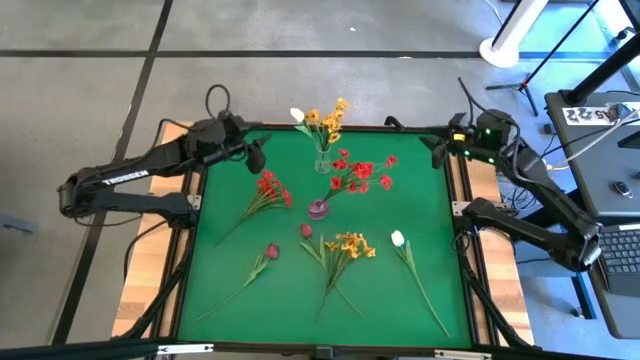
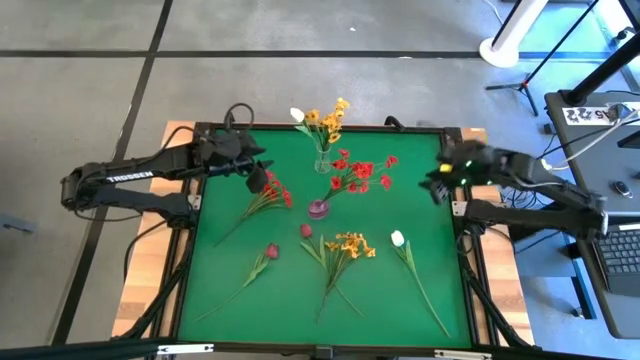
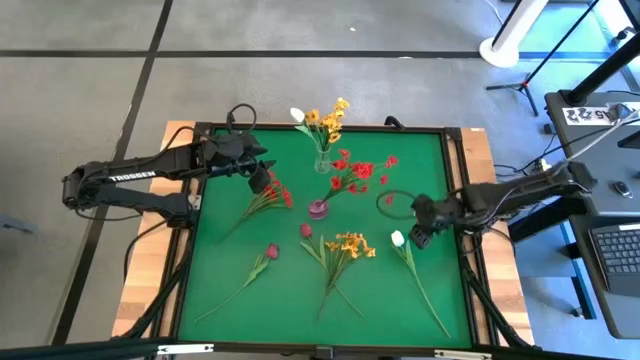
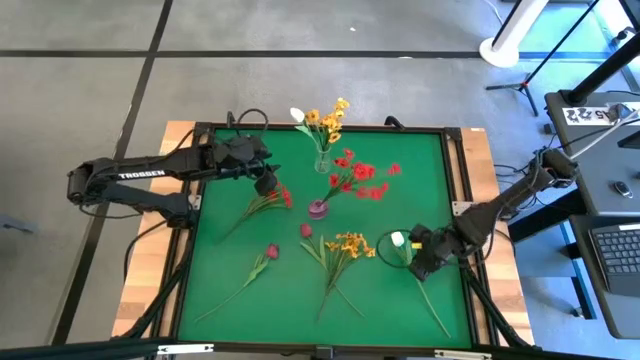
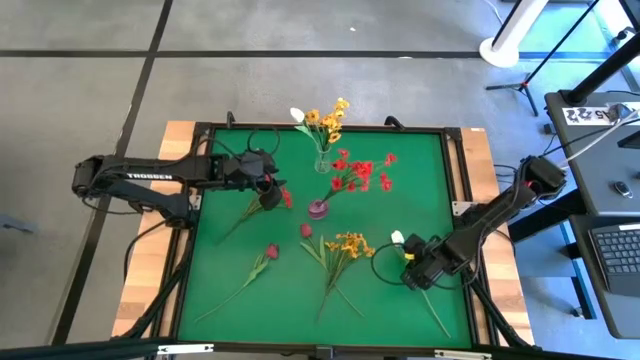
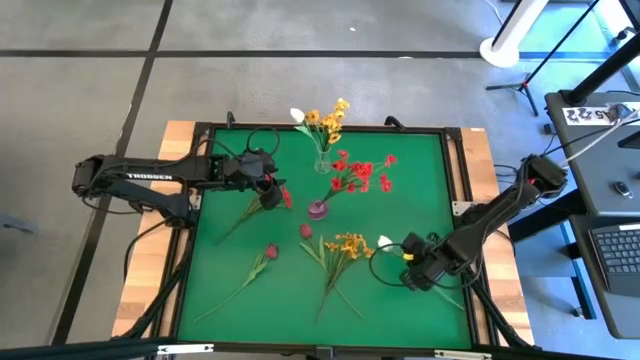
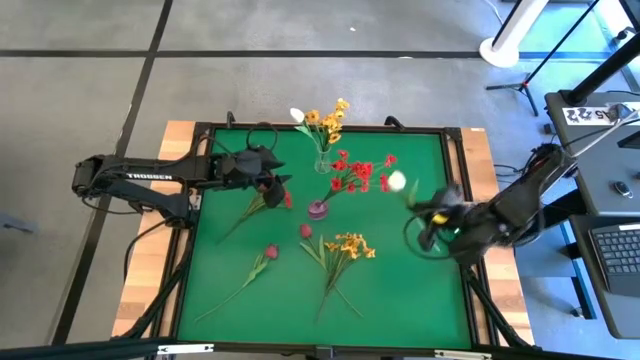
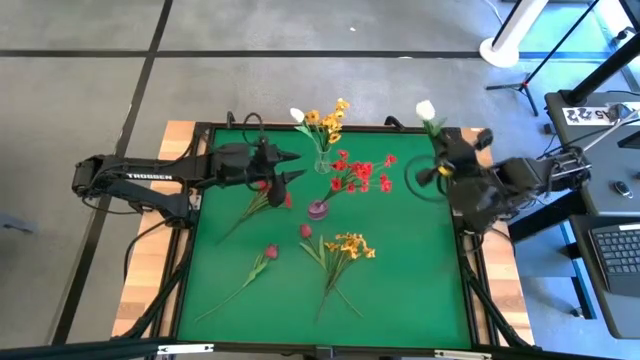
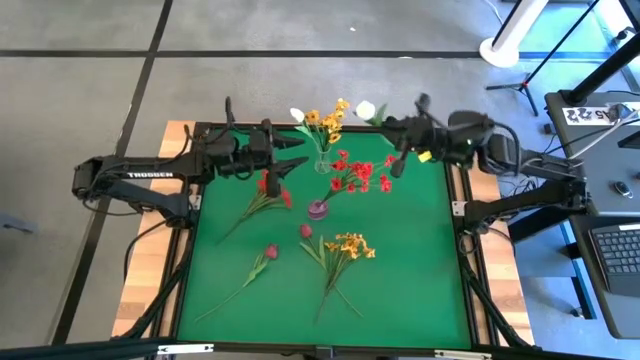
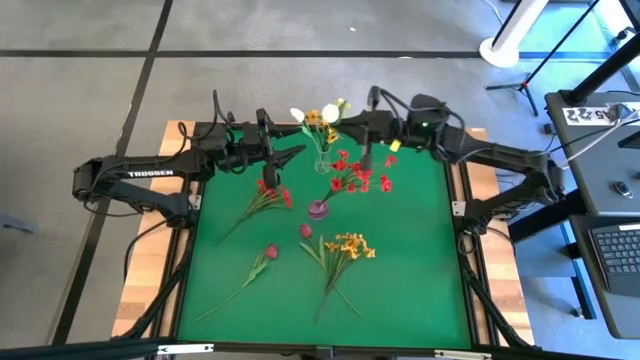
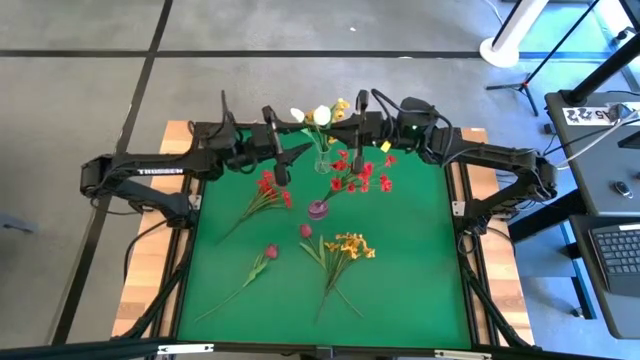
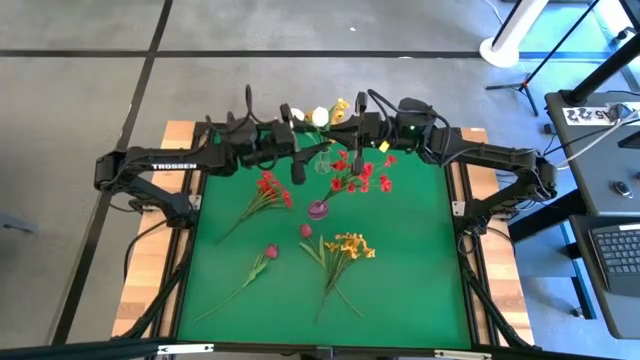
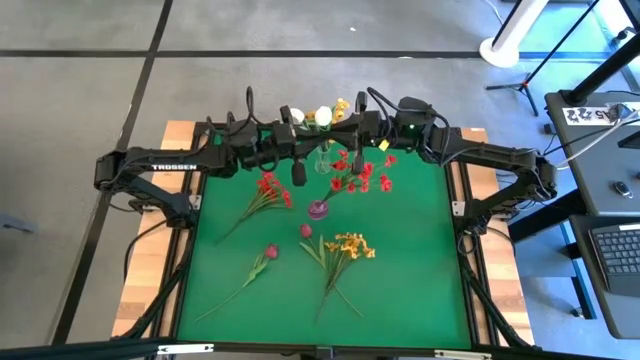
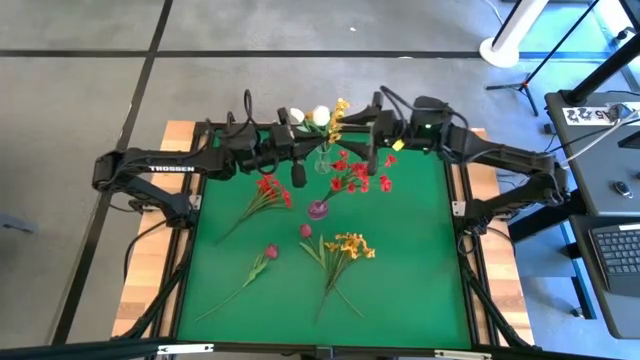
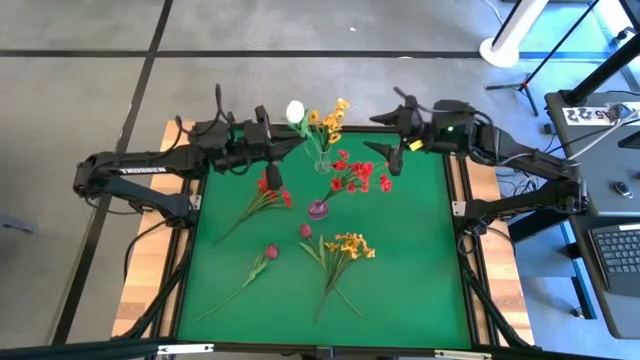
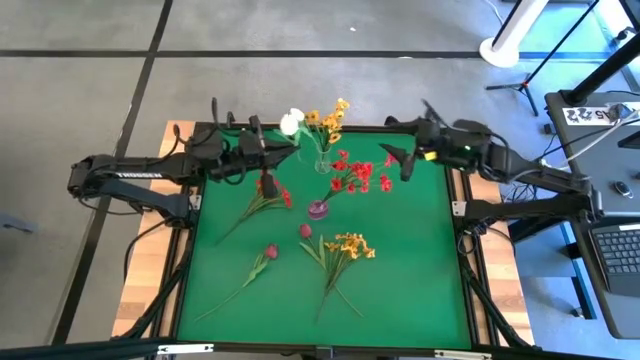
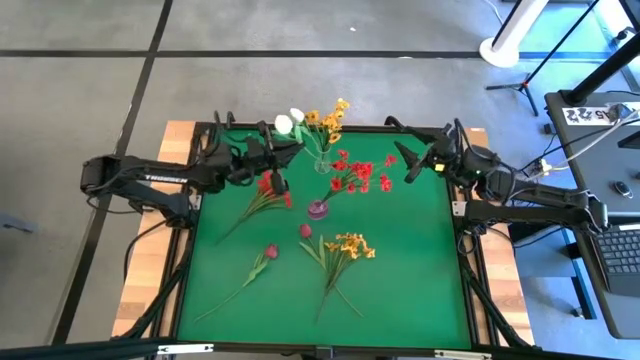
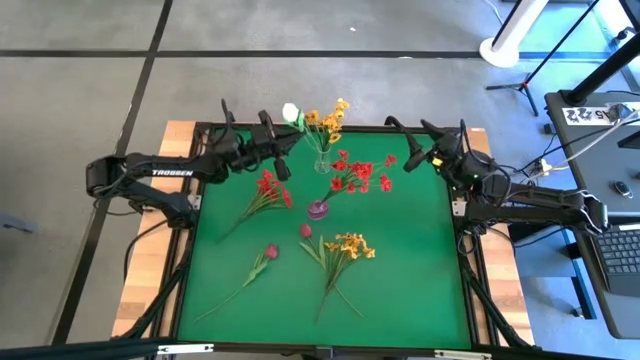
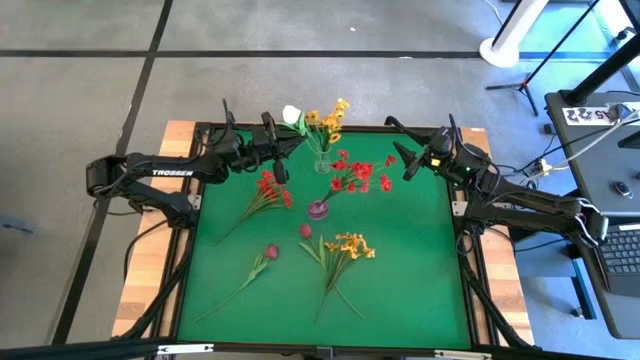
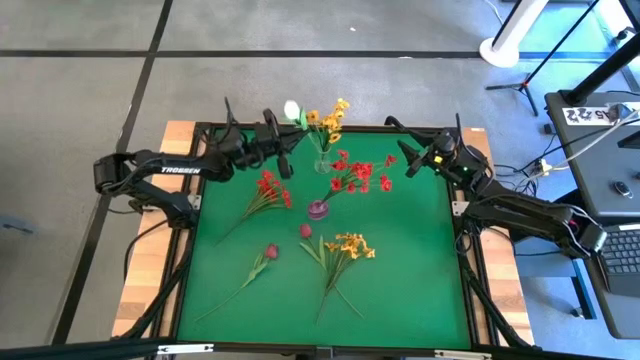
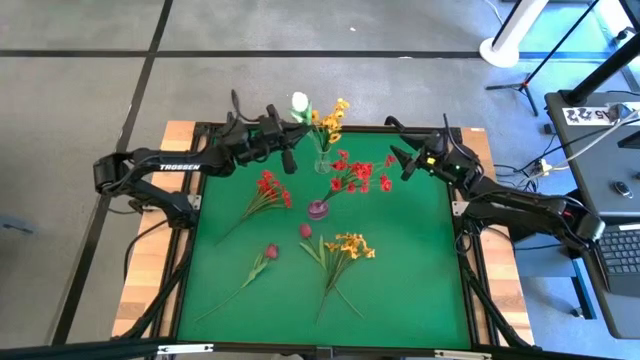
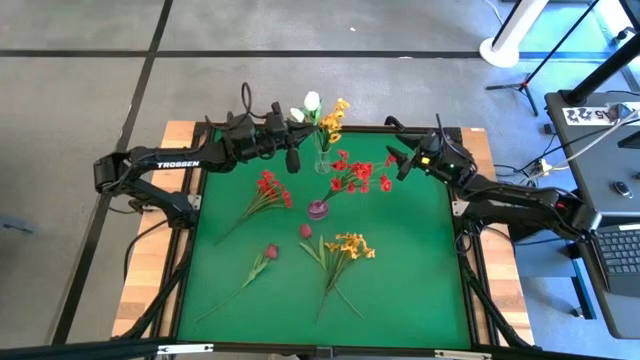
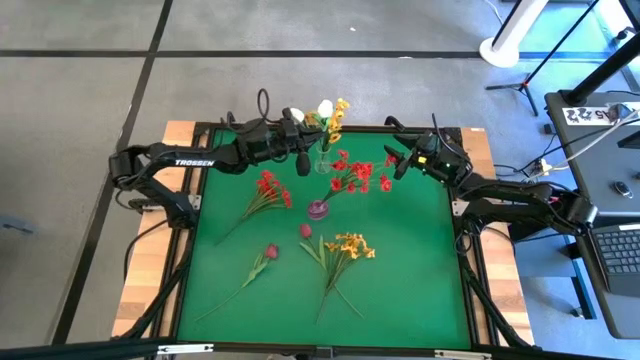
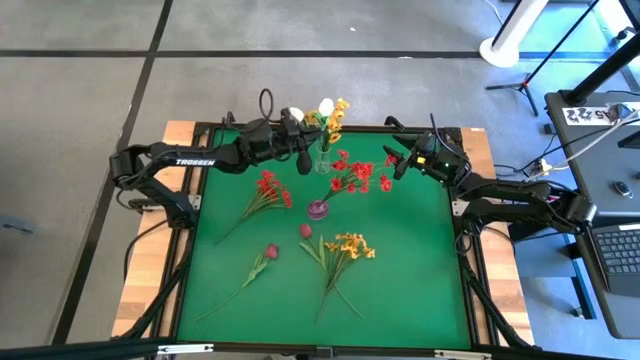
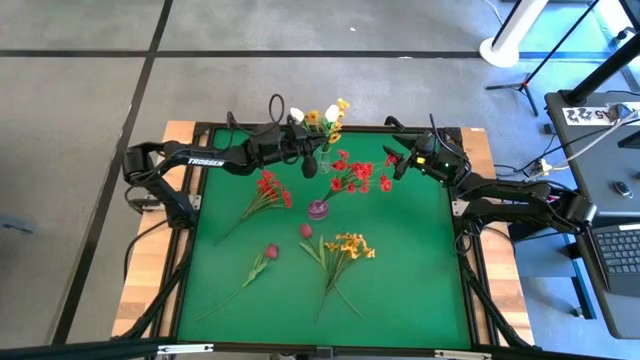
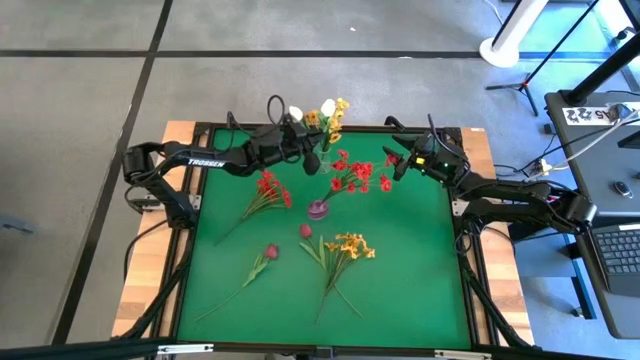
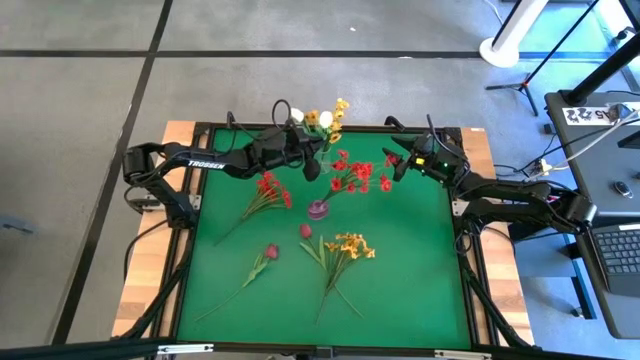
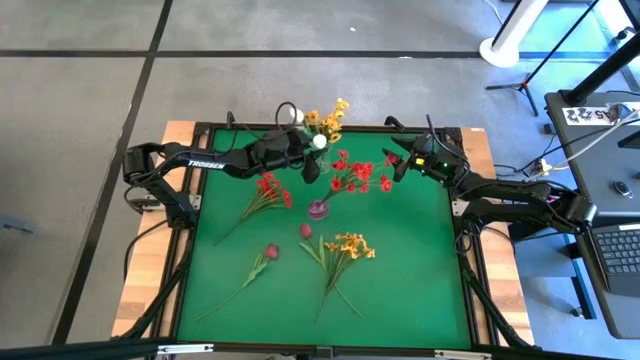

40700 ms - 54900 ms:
Task: Sort flowers into vase by color
Put the white tulip into the transparent vase
